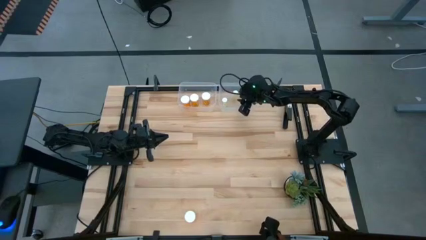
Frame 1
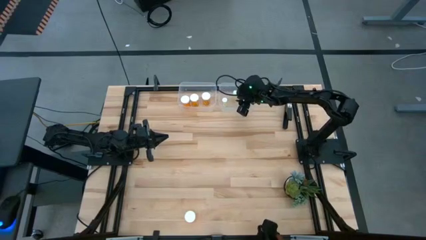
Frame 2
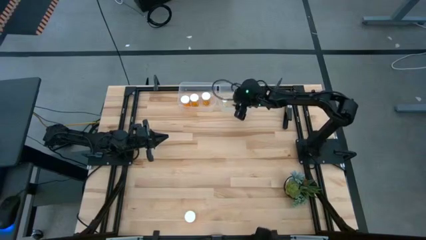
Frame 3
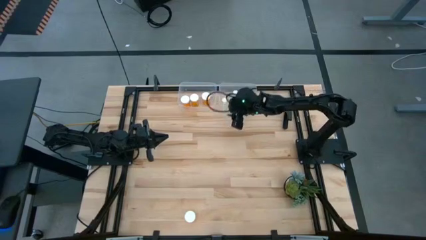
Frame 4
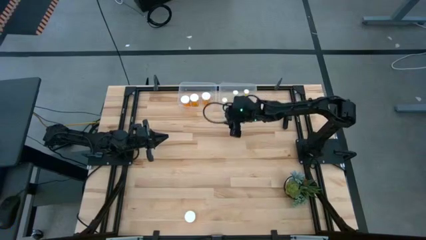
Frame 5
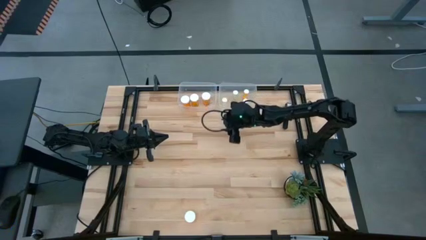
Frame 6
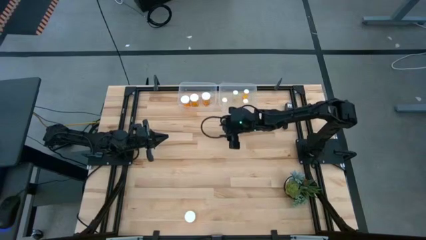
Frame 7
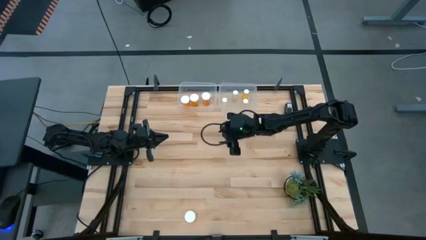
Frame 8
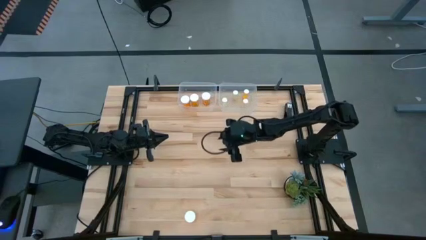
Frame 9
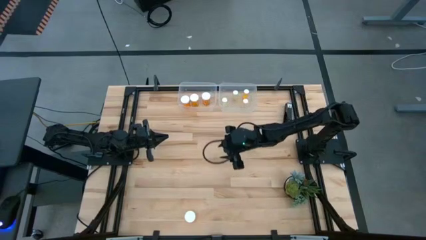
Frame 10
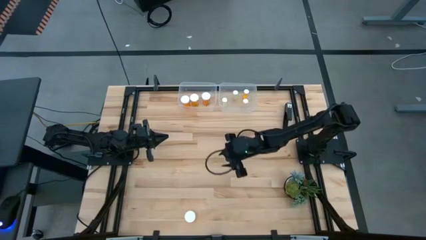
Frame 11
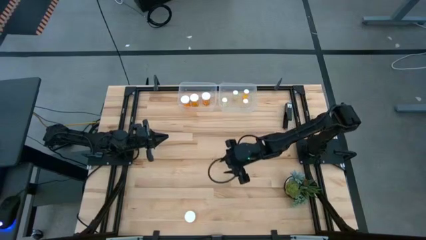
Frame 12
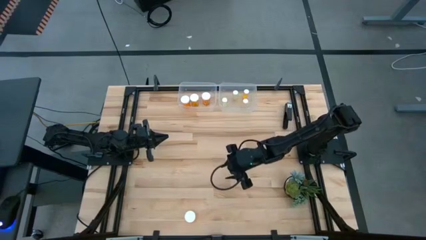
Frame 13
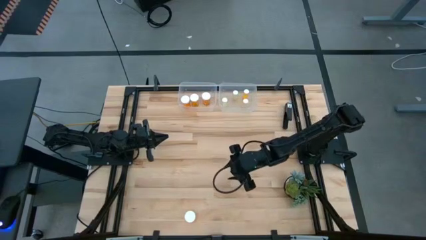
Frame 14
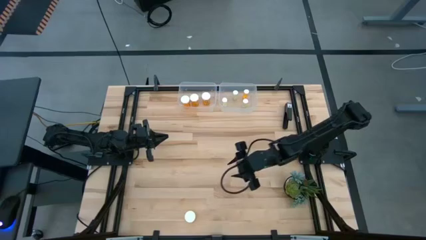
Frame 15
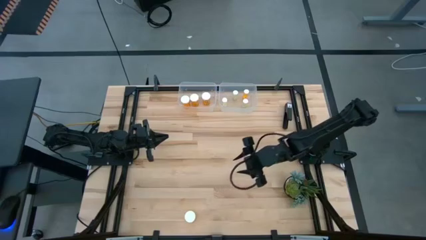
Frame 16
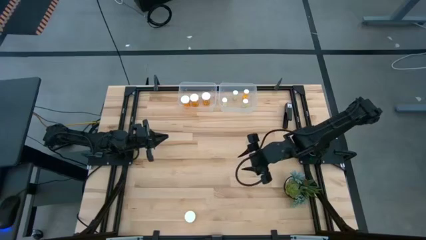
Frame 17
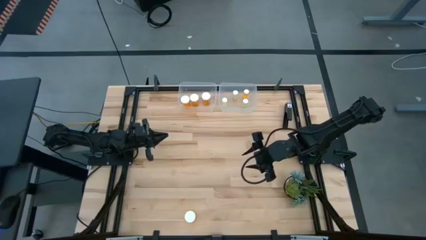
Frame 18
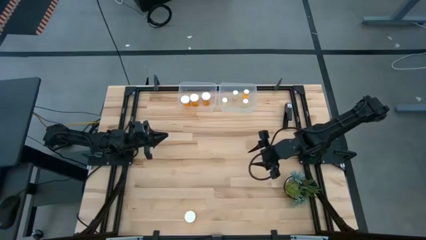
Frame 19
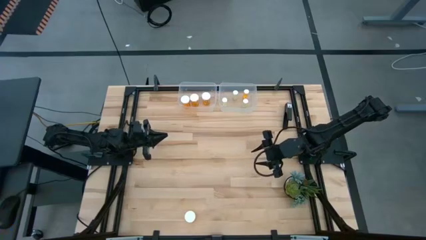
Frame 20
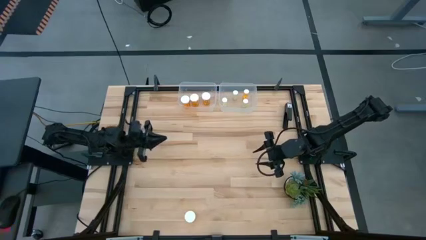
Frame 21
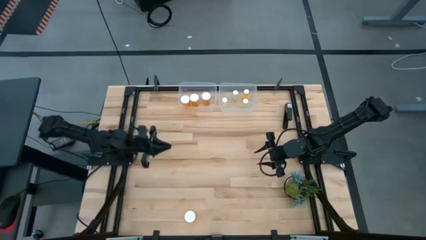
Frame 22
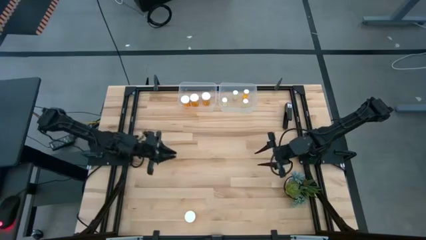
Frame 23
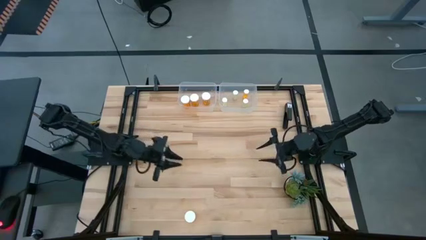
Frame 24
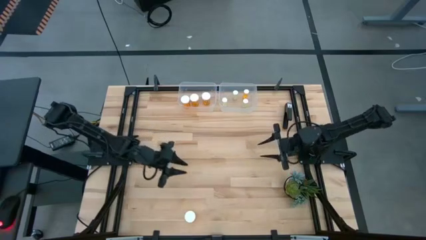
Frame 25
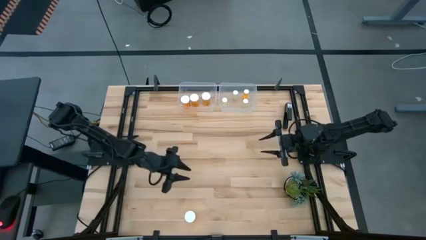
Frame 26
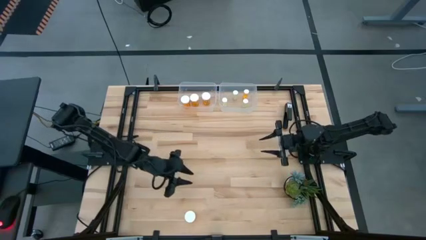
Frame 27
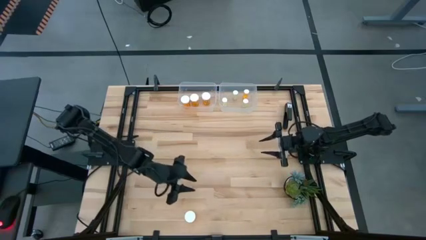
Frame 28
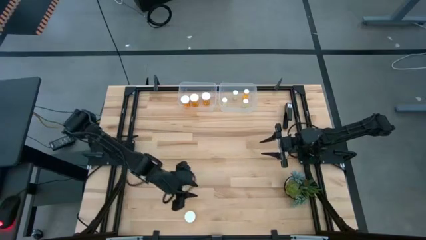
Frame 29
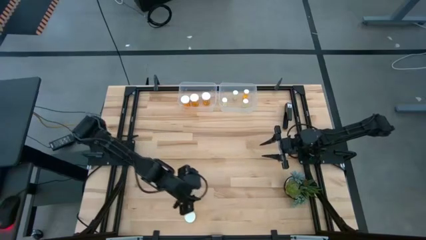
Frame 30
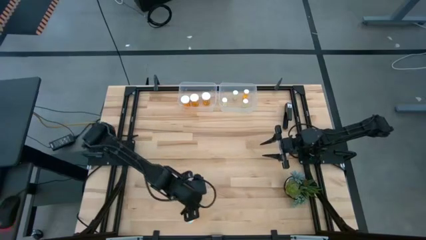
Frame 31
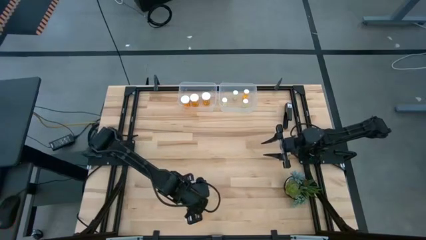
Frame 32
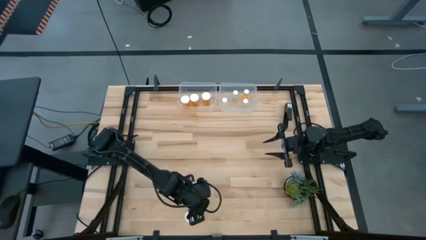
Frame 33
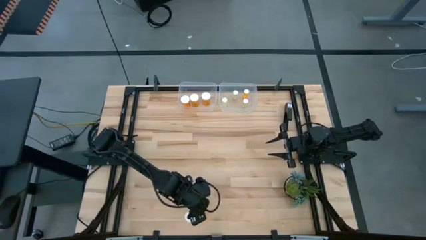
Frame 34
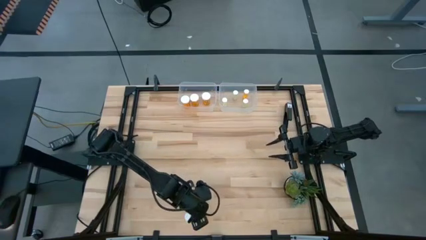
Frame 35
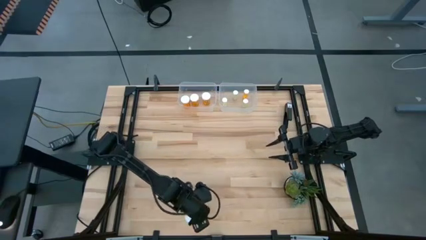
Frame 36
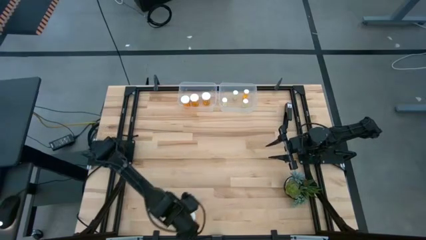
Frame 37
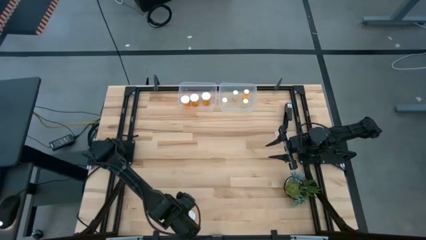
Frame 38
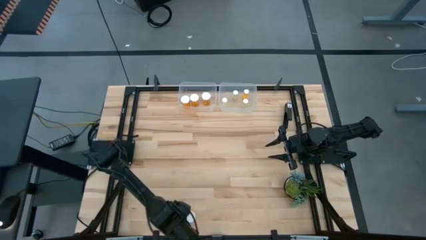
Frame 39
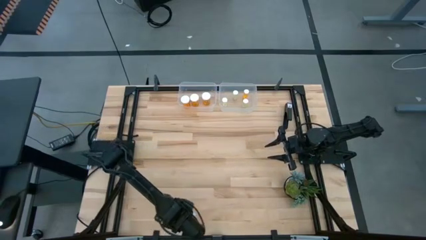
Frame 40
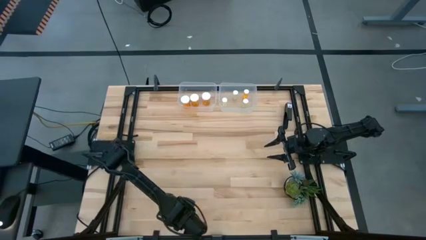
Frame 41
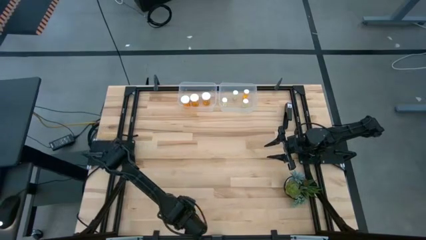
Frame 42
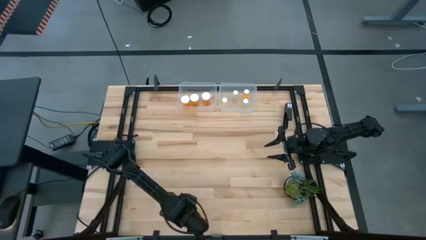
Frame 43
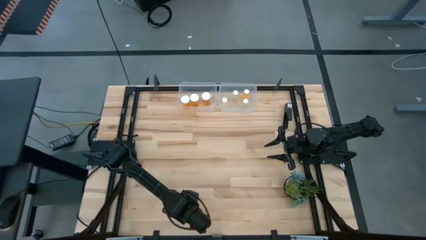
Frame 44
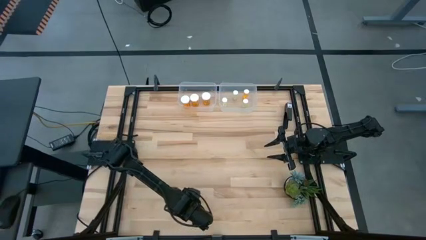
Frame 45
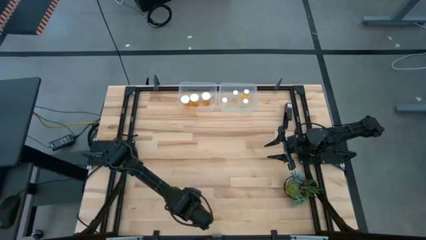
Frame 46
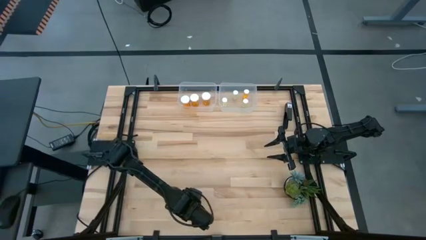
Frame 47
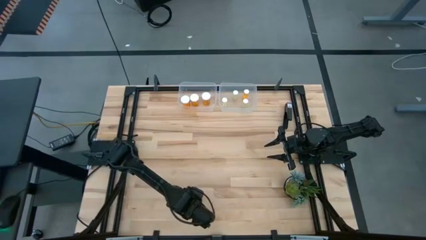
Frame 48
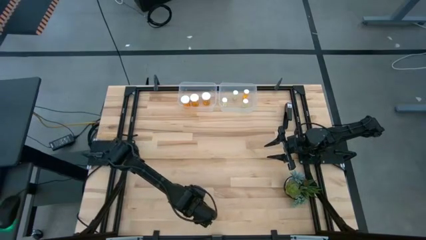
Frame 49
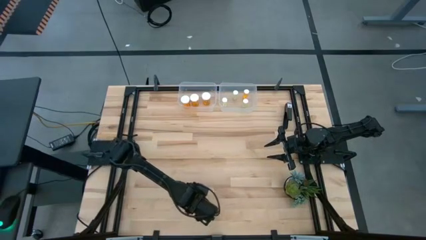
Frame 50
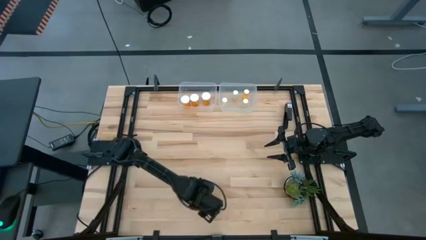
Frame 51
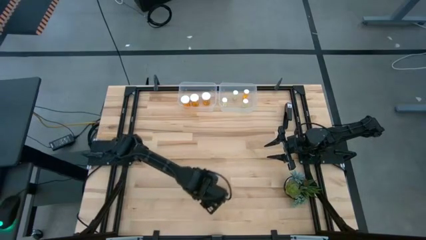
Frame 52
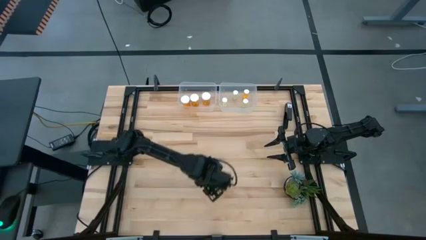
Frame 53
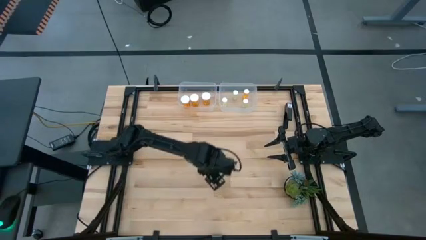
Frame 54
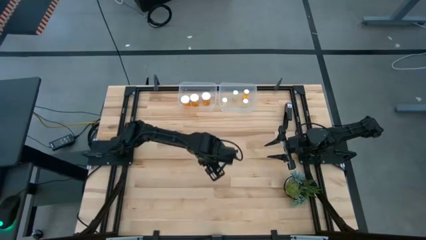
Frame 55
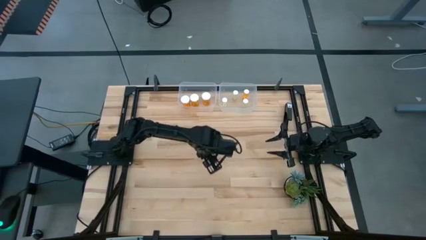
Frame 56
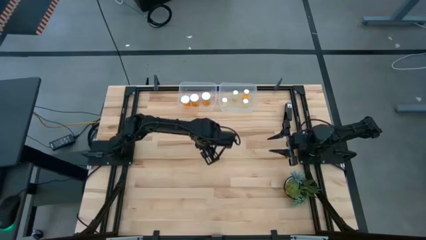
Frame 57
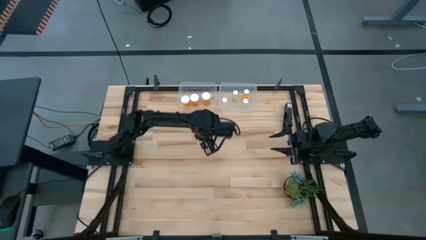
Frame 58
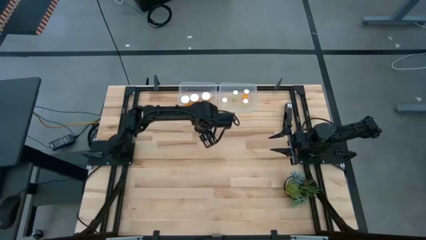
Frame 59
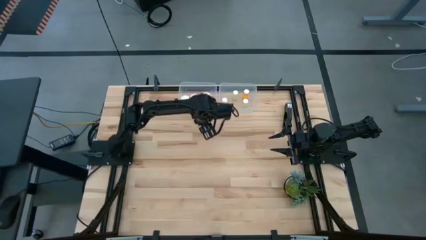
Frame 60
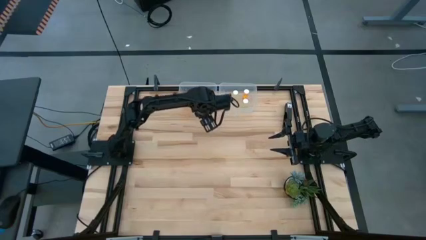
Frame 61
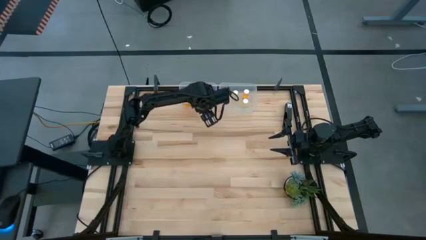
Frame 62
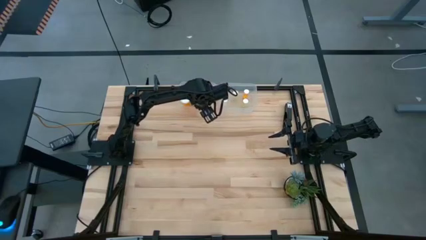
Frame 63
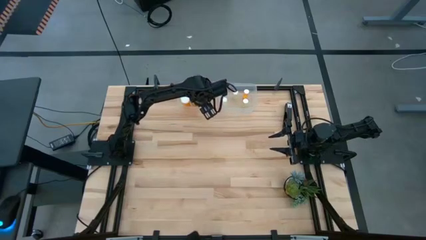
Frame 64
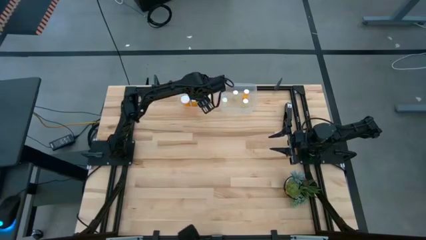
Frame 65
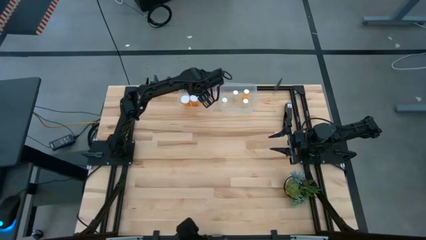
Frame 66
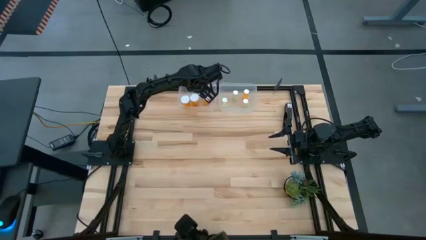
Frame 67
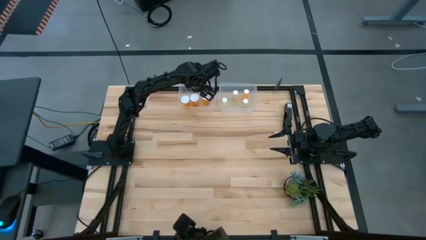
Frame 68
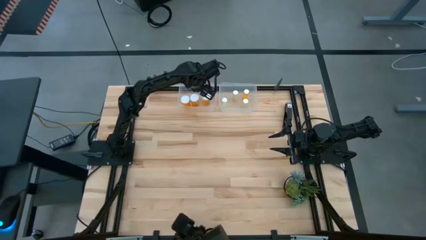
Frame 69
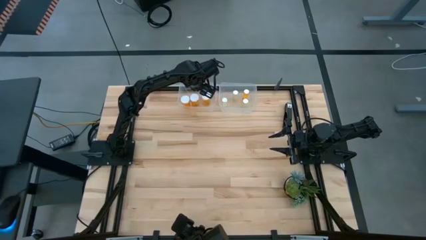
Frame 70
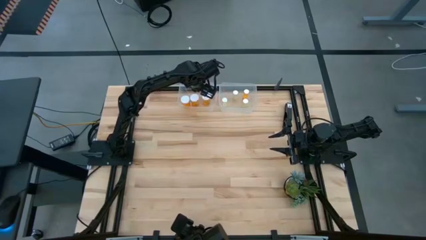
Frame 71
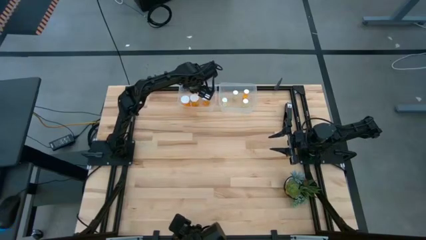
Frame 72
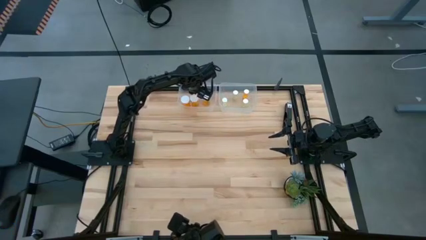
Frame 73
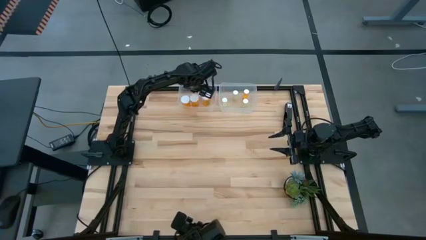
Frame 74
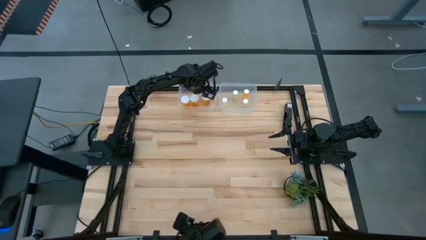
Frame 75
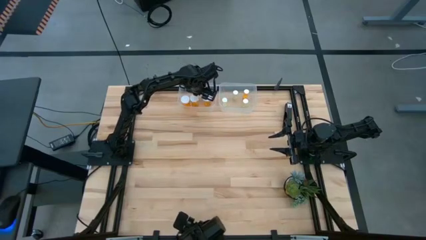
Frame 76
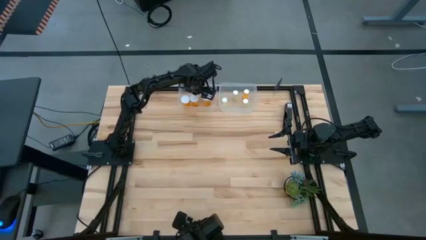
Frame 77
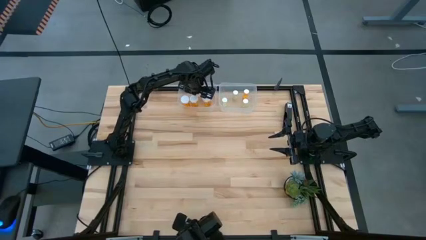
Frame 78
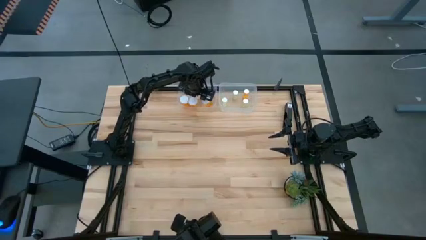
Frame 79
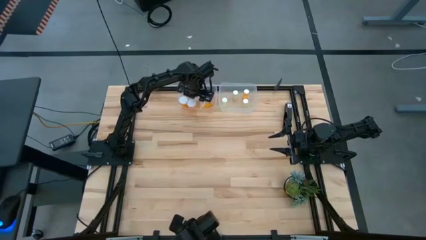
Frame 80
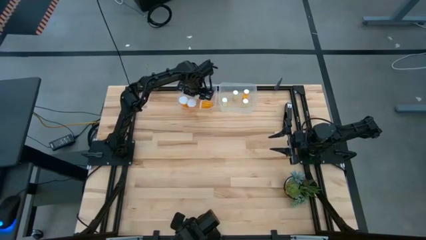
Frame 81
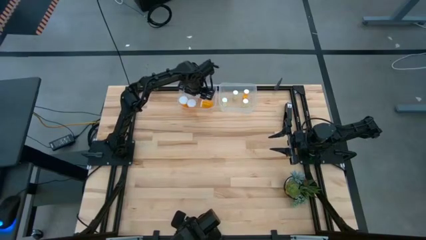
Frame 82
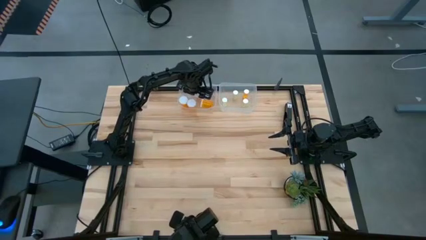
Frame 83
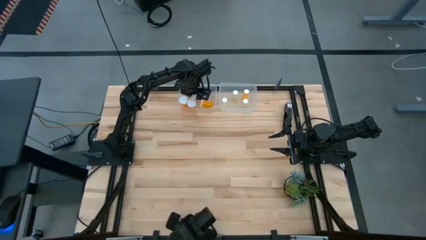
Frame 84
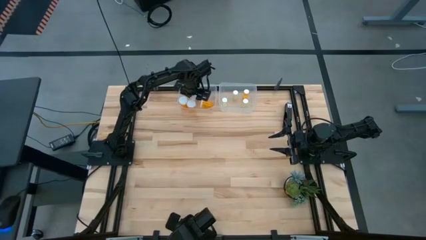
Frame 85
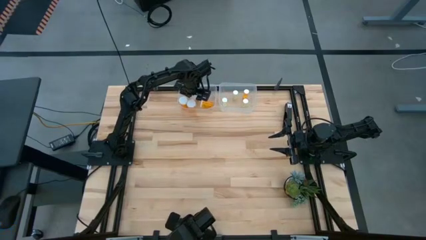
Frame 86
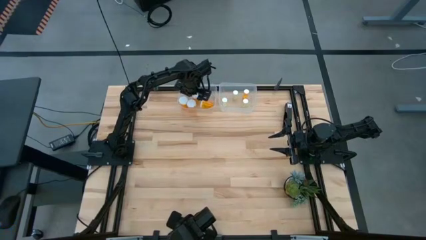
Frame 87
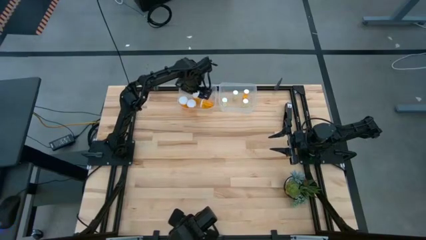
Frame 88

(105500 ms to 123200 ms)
Task: Pick and place medicine bottles into bin by pill shape (circle, oval)
Put the large orange pill bottle into the left transparent bin
